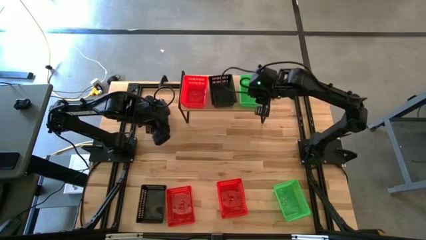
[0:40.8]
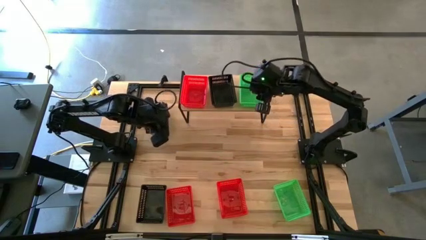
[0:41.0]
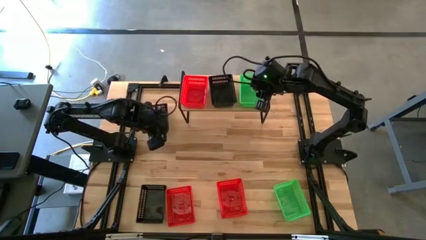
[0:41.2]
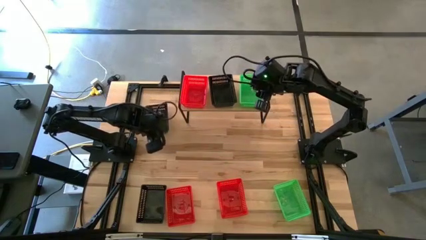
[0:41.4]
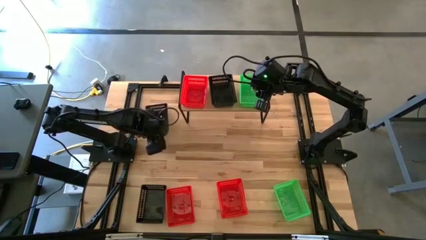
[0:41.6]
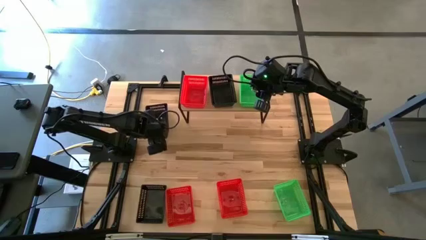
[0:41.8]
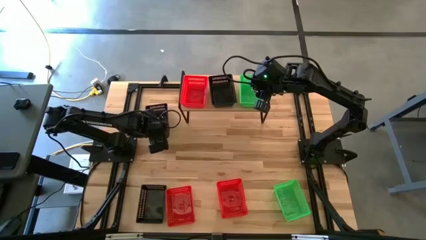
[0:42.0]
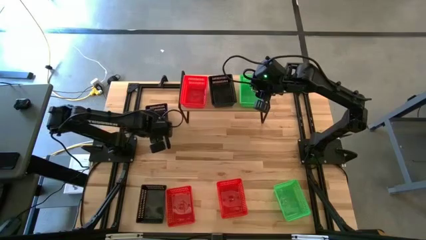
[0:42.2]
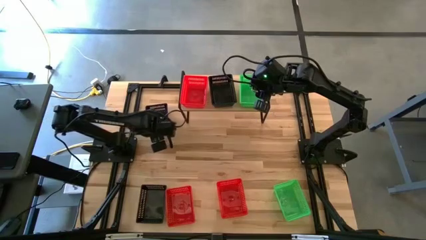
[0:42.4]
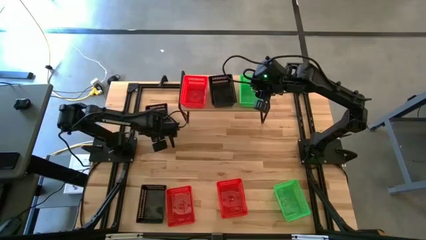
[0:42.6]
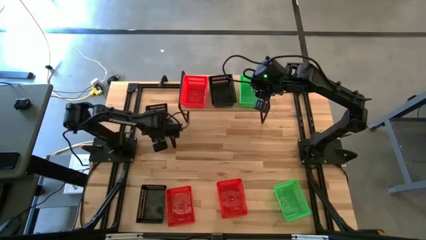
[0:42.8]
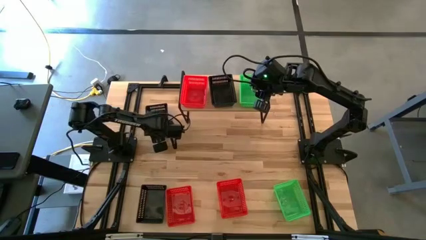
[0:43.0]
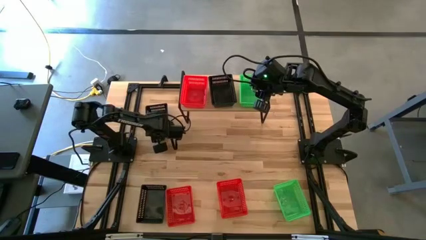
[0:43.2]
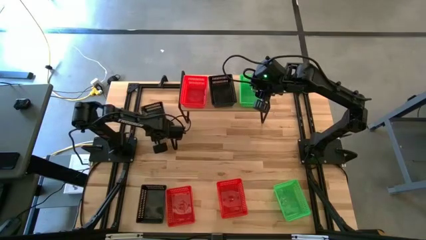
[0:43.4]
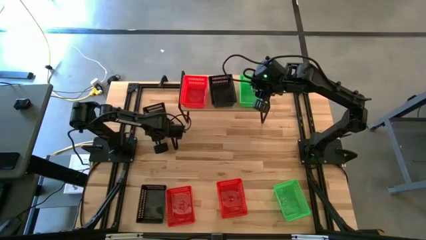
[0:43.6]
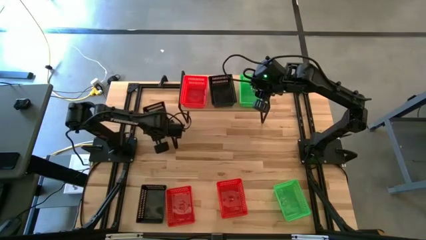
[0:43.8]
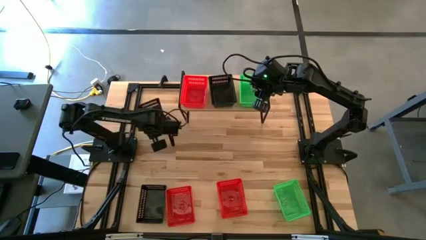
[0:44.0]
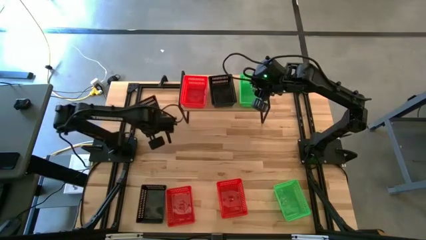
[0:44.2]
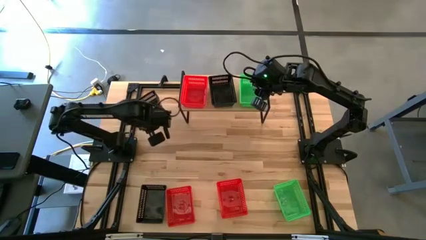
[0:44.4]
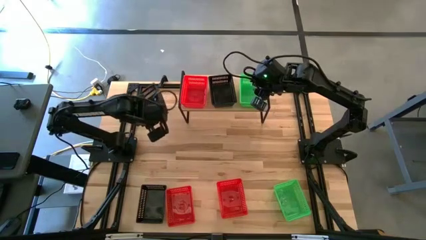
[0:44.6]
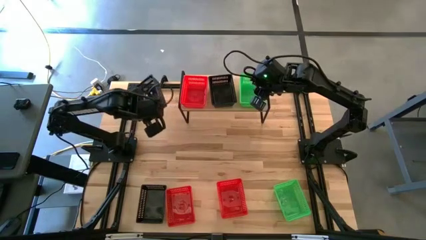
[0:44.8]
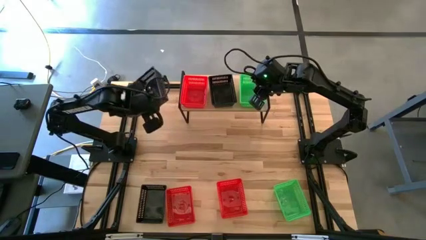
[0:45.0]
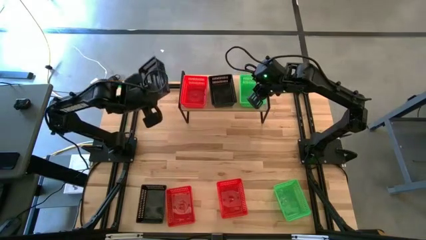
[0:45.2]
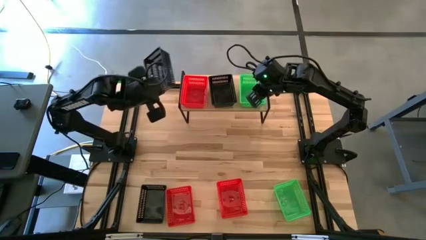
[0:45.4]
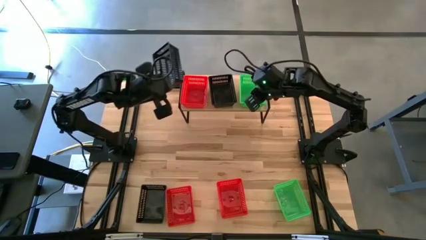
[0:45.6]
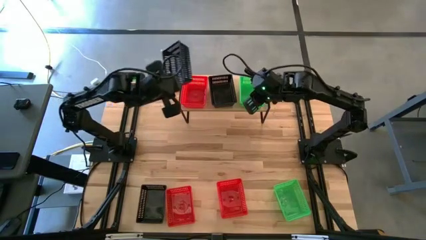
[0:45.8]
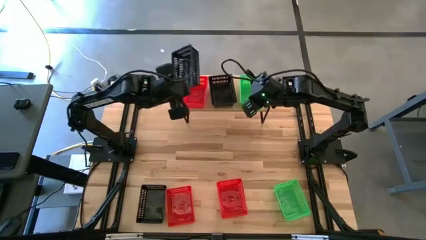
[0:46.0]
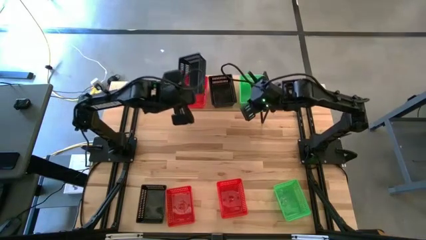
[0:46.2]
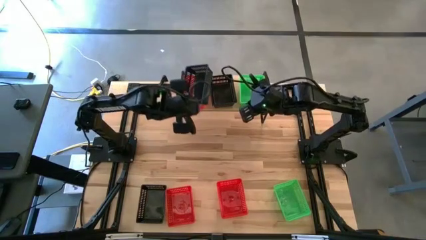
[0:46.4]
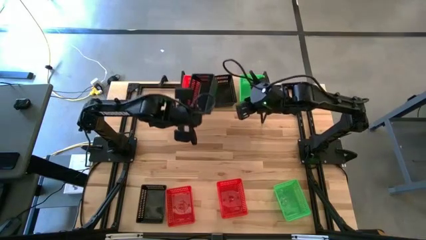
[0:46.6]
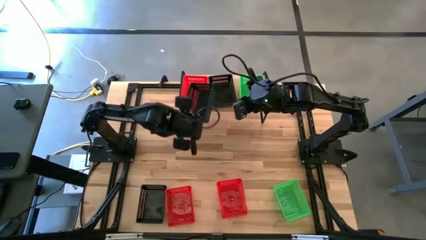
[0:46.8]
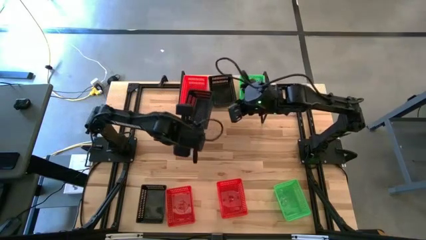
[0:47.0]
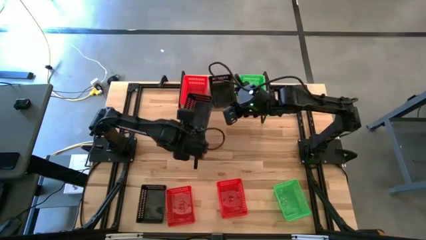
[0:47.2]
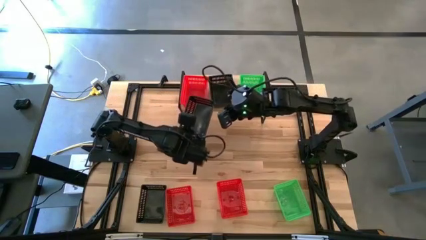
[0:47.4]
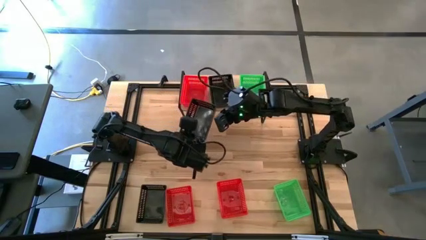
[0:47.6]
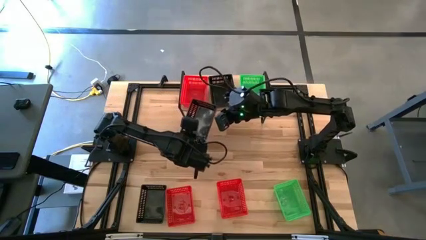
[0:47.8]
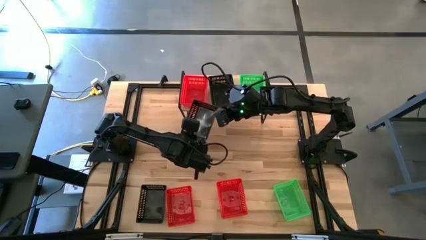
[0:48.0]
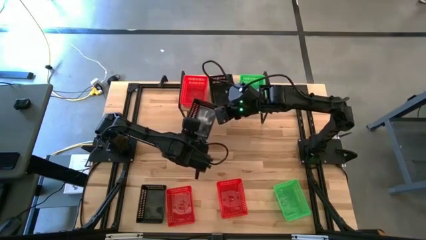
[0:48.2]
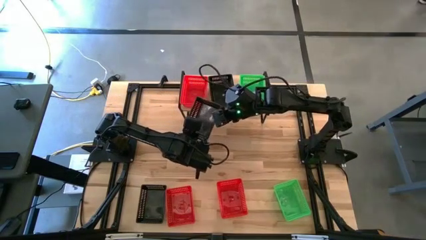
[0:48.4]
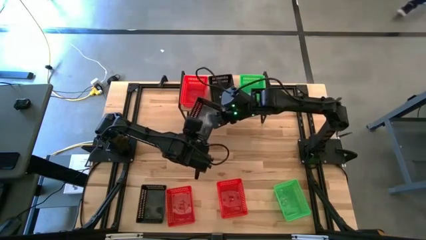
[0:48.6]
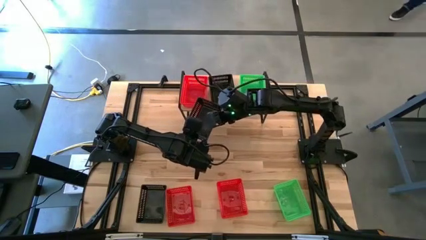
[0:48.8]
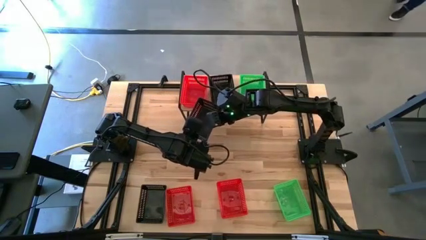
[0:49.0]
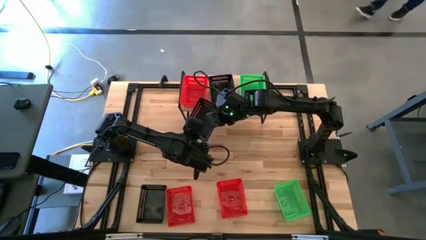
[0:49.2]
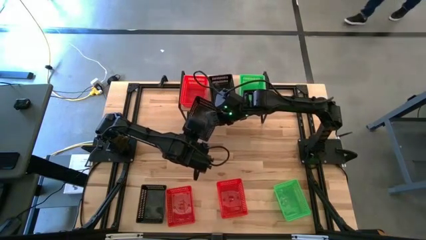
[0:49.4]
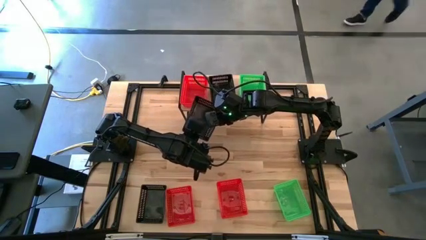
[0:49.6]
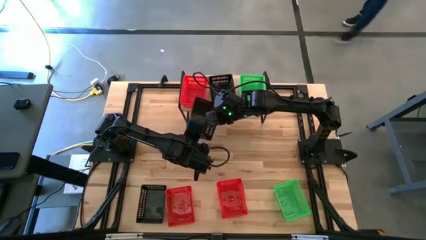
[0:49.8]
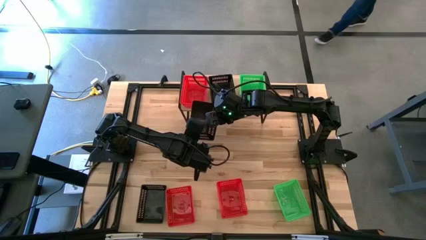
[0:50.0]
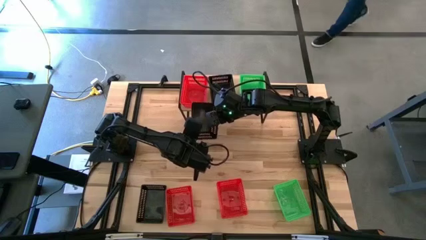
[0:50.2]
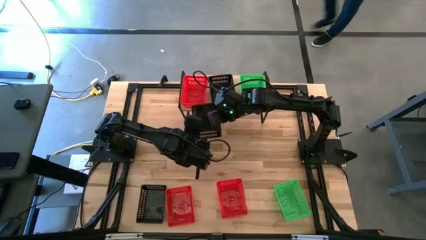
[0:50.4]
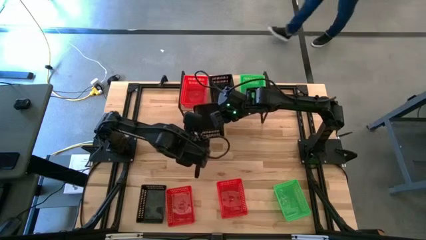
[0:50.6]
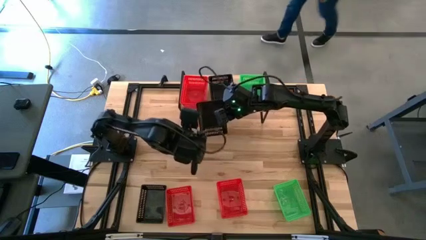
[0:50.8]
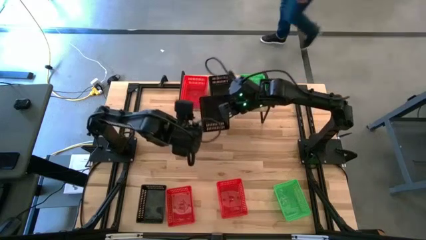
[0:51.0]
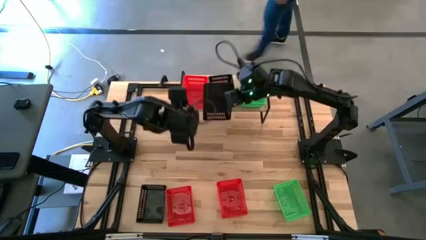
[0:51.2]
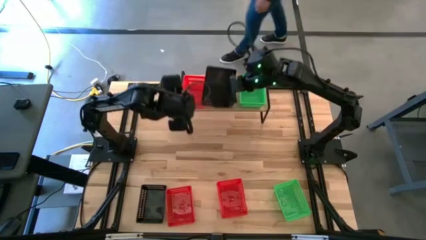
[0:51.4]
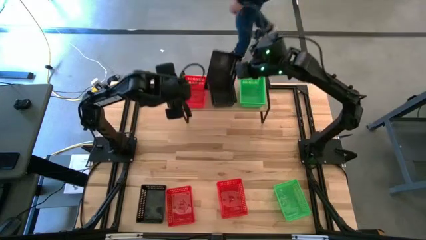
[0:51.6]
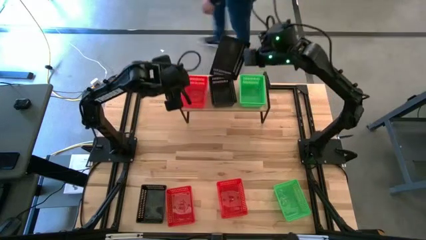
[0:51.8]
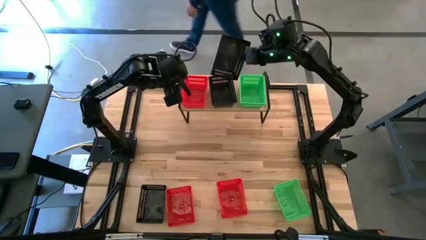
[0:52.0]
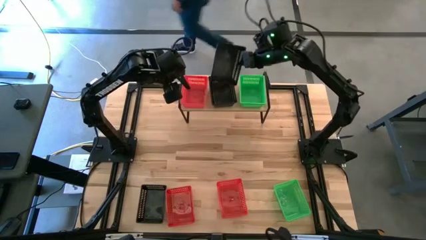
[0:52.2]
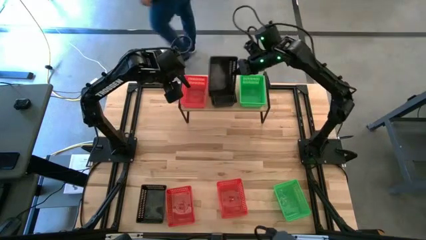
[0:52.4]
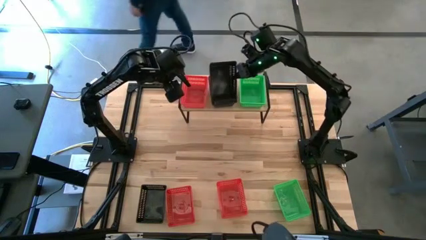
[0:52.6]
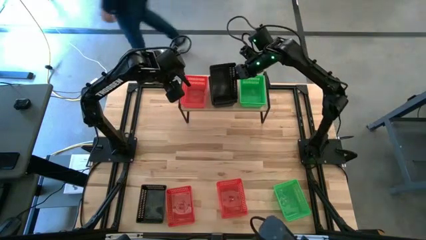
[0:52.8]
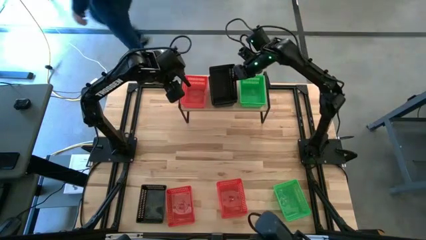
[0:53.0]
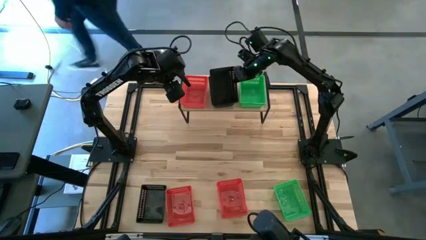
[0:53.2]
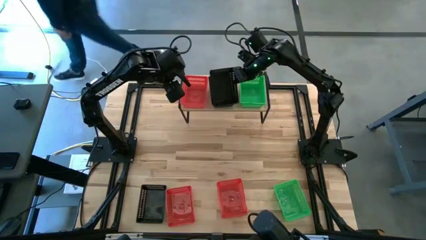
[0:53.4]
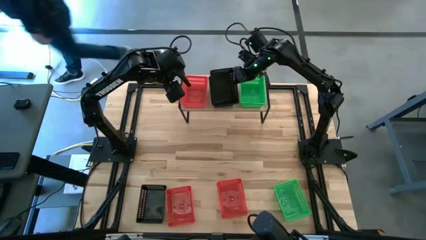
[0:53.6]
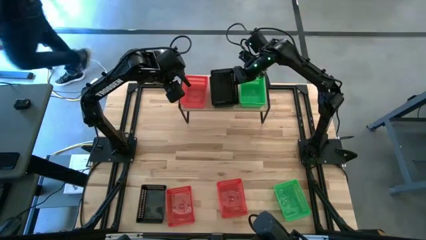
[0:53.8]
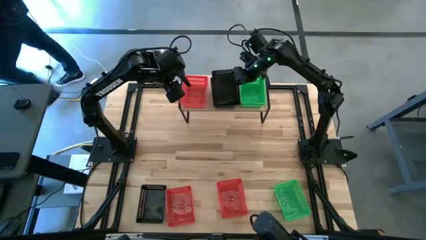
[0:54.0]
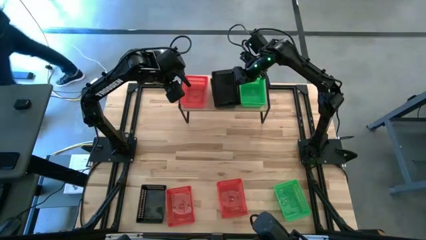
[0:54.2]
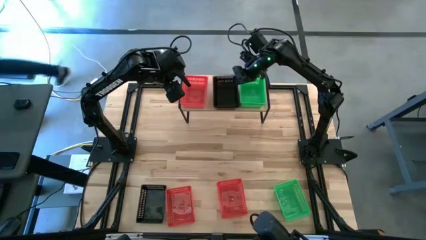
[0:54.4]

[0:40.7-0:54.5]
Task: Stack baskets on shelf by color
Stack the top black bin on the black bin on the shelf
